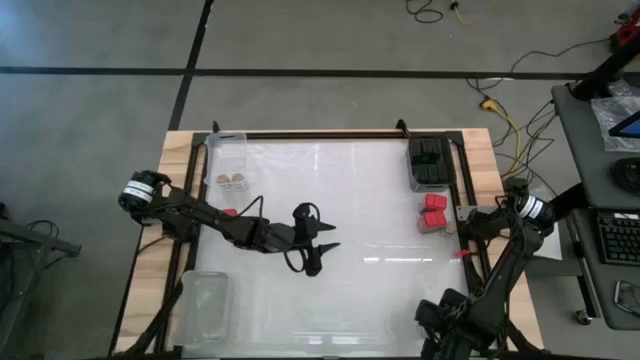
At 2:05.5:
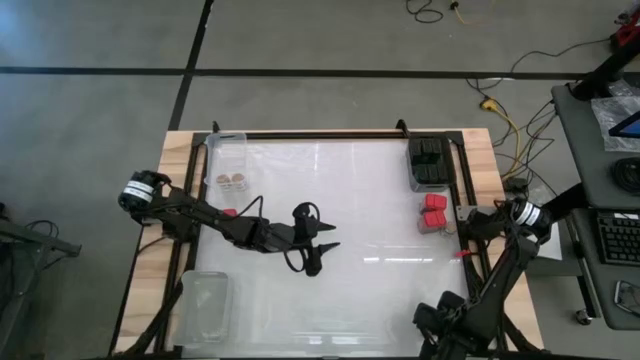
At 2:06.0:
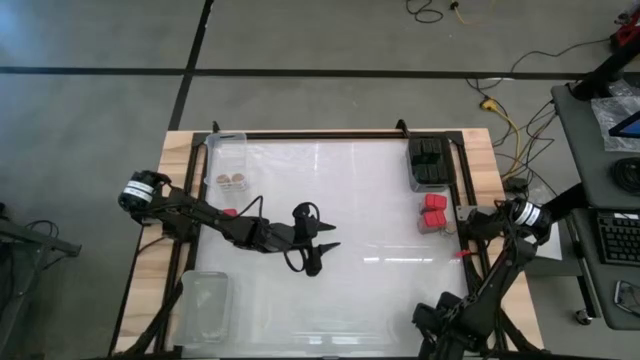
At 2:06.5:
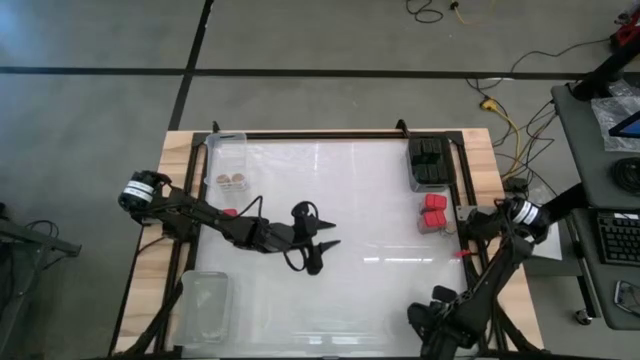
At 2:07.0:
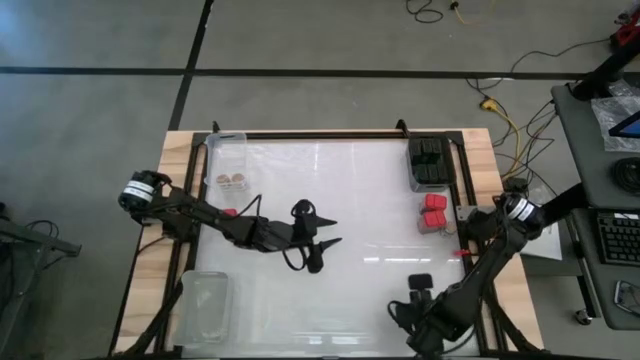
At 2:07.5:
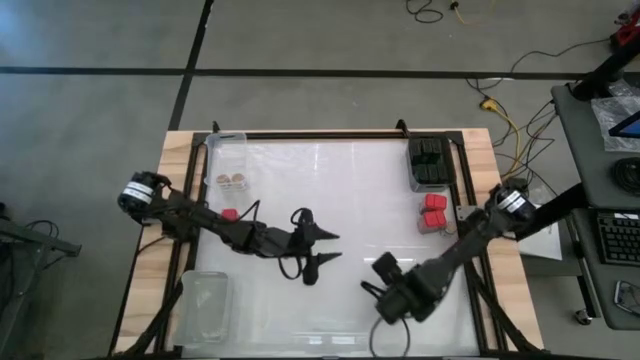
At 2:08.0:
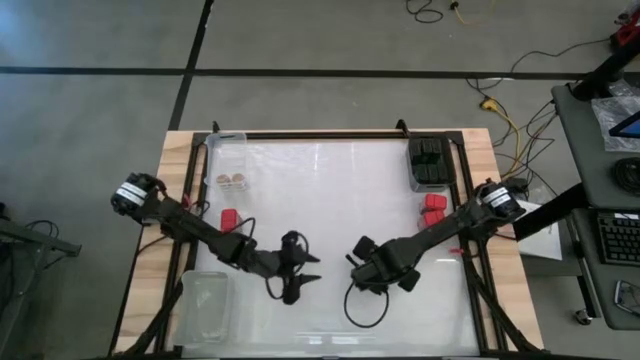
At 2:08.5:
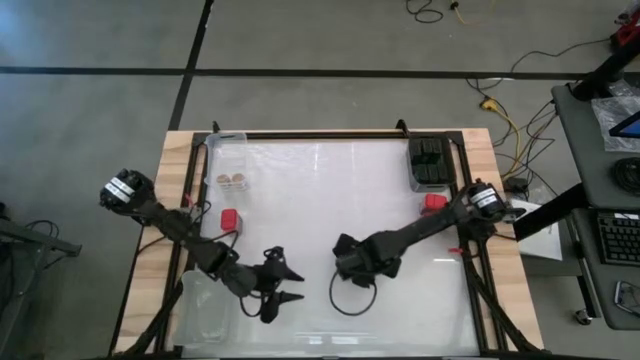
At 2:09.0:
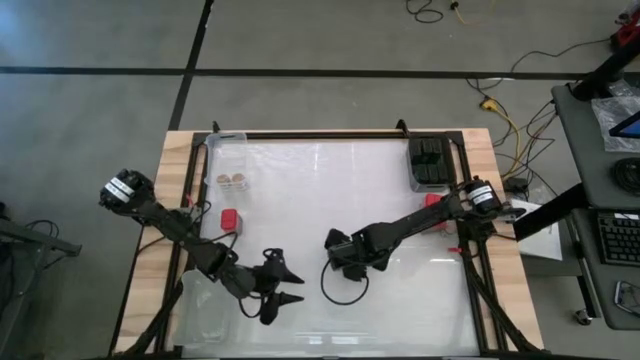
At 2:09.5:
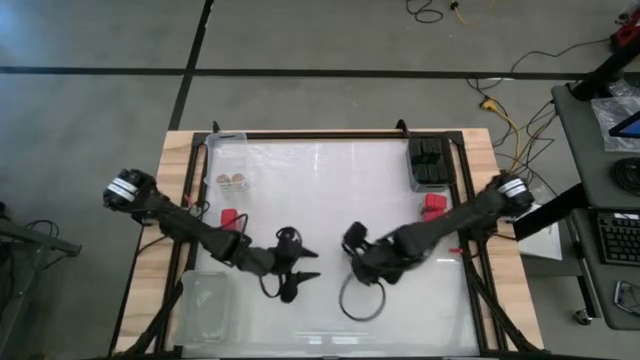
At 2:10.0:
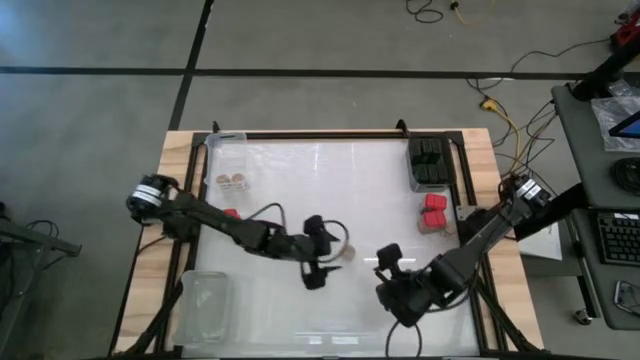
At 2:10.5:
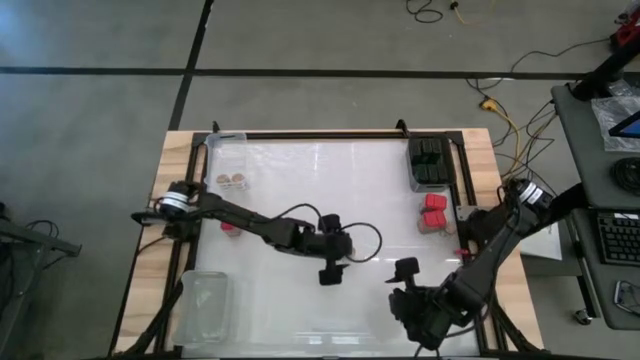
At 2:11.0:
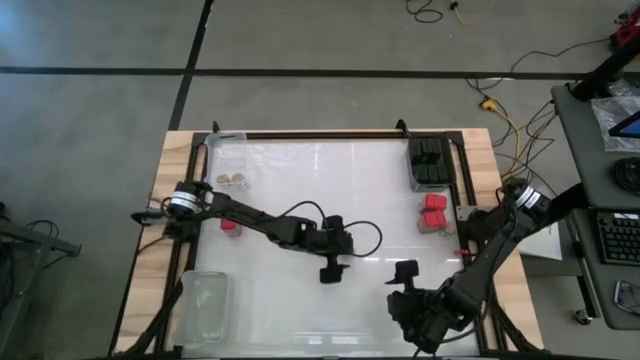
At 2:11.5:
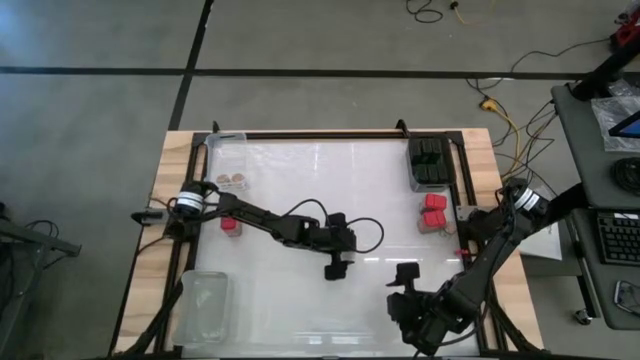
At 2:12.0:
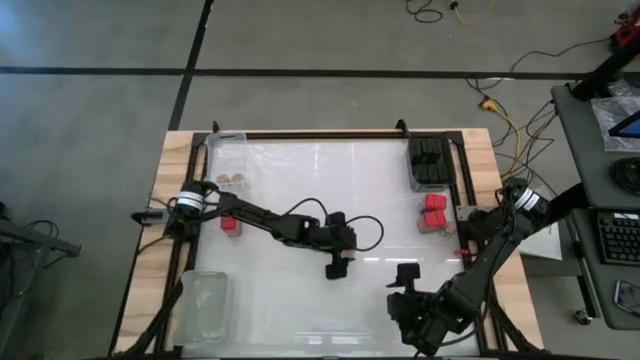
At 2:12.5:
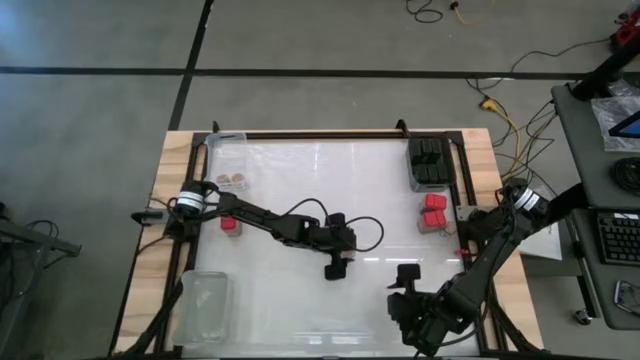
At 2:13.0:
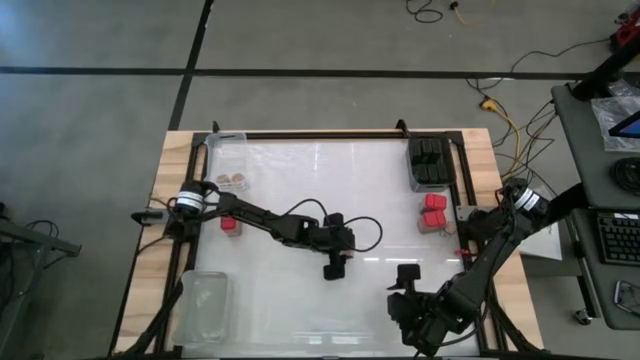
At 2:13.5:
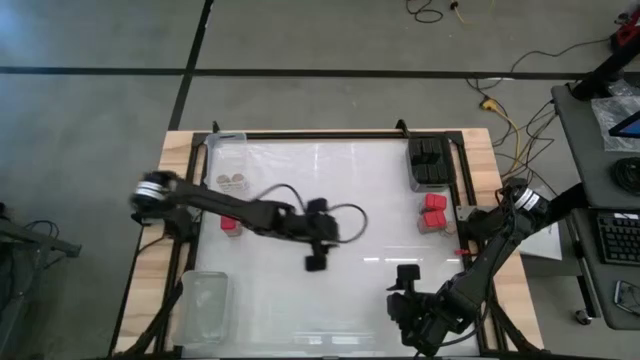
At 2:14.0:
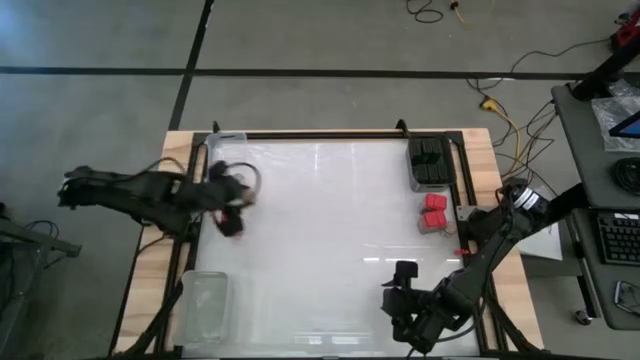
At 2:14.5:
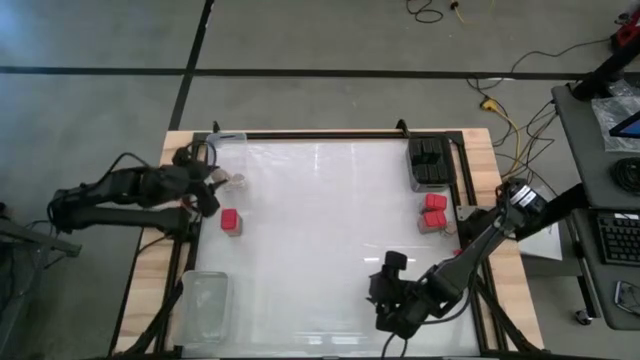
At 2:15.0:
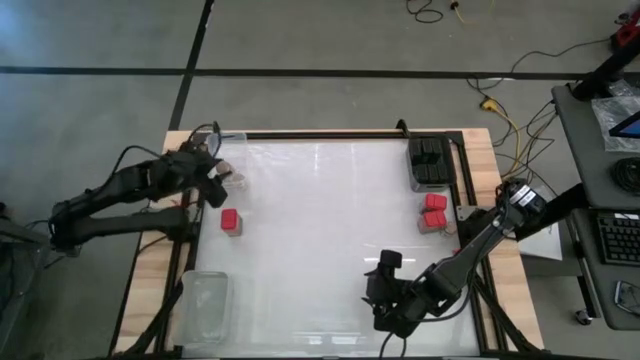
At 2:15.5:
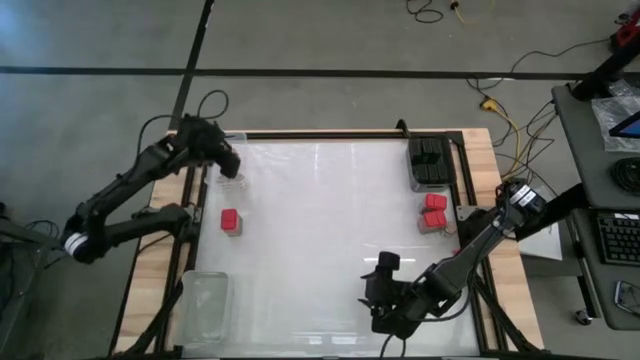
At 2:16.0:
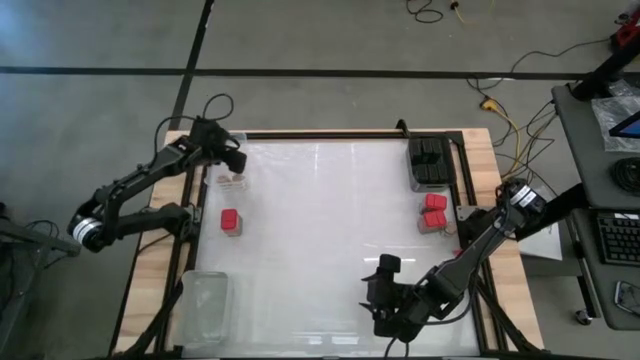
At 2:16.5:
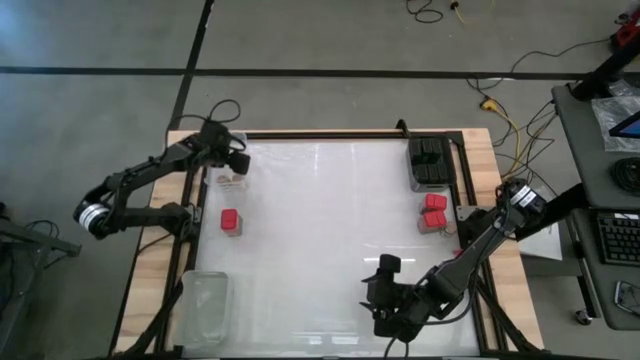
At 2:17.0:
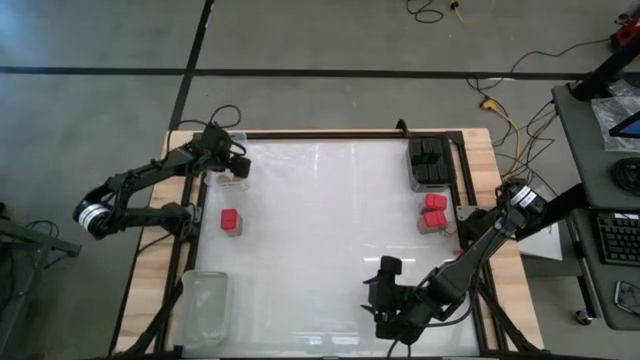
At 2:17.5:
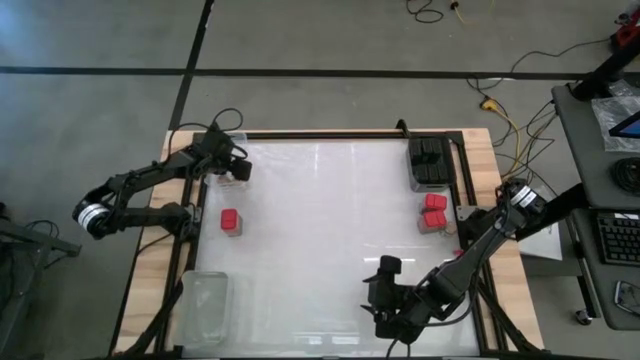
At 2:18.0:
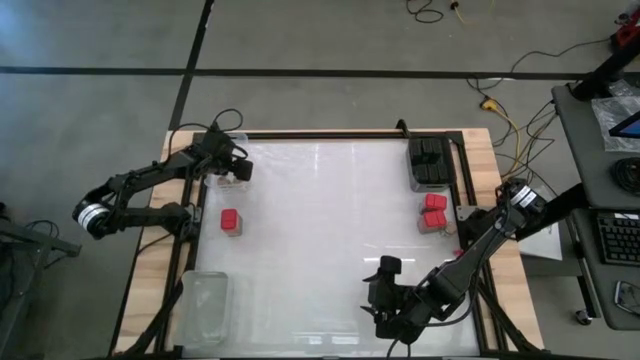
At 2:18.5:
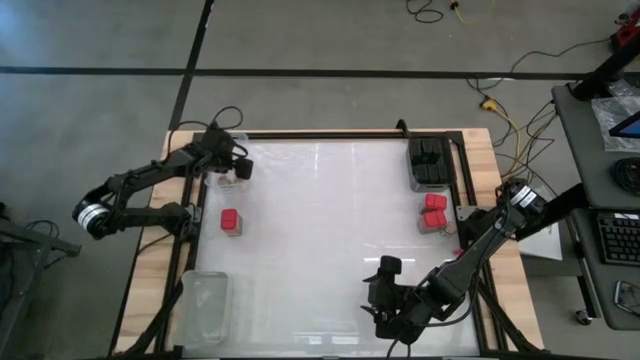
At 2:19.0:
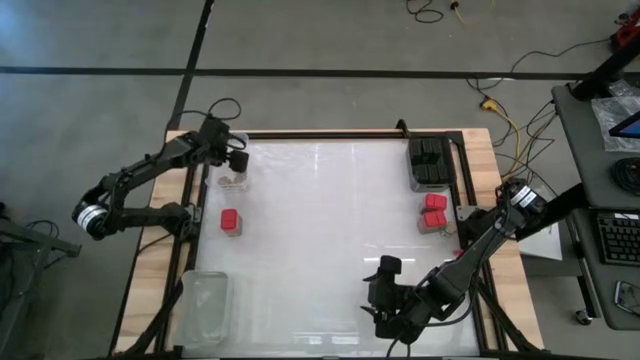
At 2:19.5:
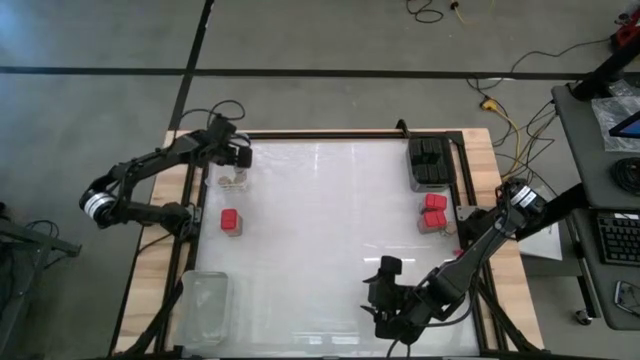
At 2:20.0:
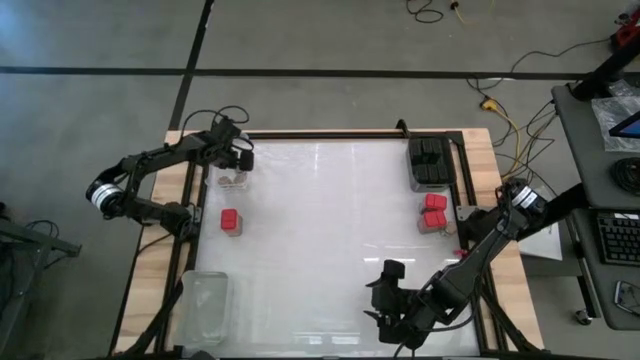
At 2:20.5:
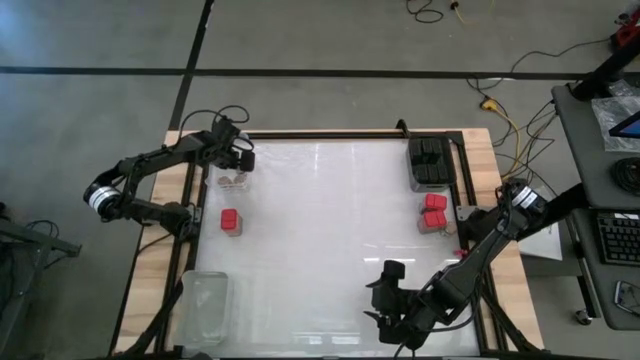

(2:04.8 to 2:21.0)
Task: Sort spices by type
Put the brown seasoning bottle into the transparent bin

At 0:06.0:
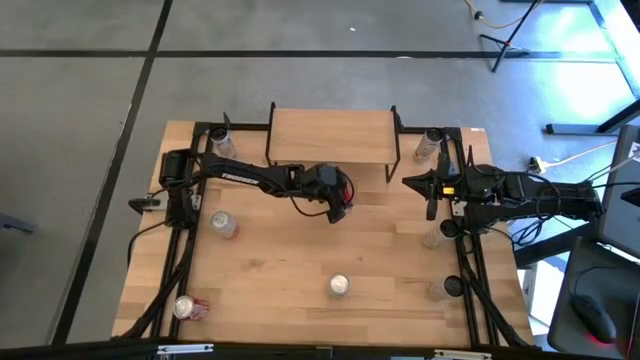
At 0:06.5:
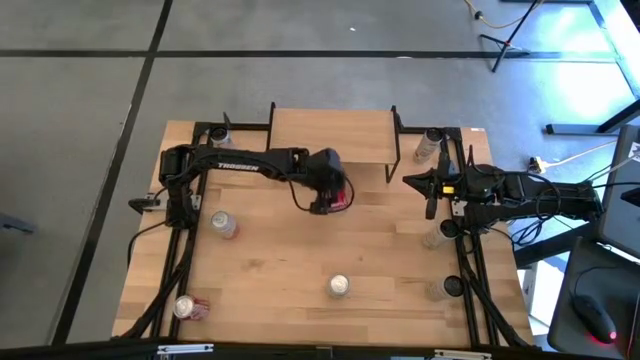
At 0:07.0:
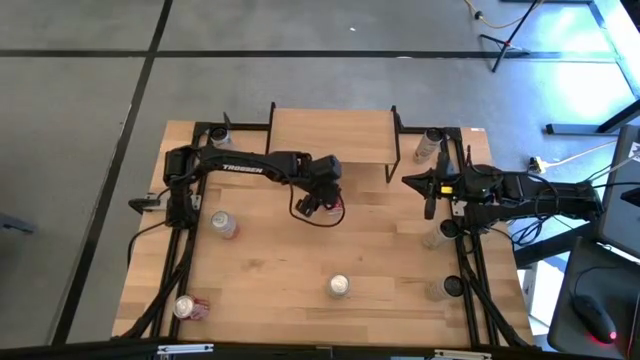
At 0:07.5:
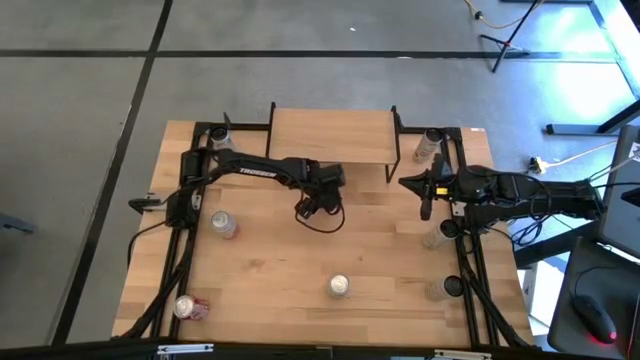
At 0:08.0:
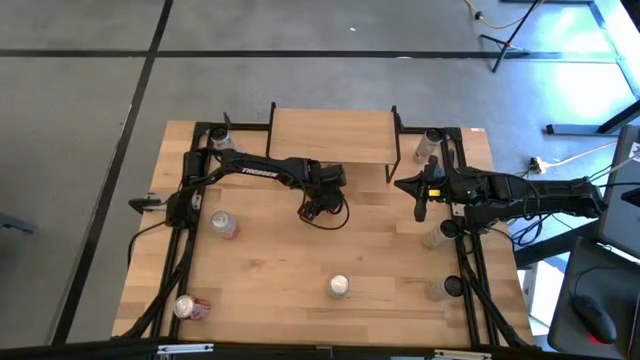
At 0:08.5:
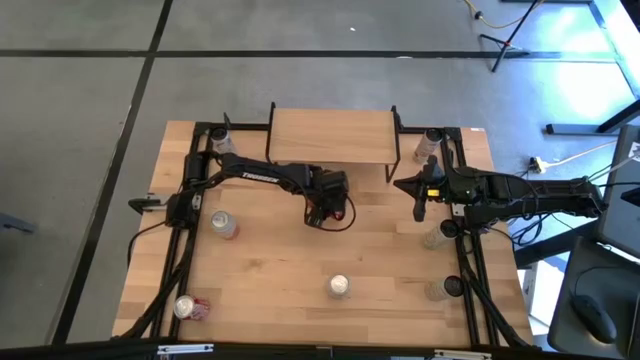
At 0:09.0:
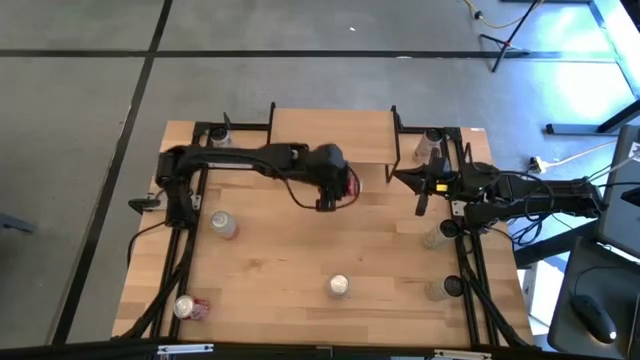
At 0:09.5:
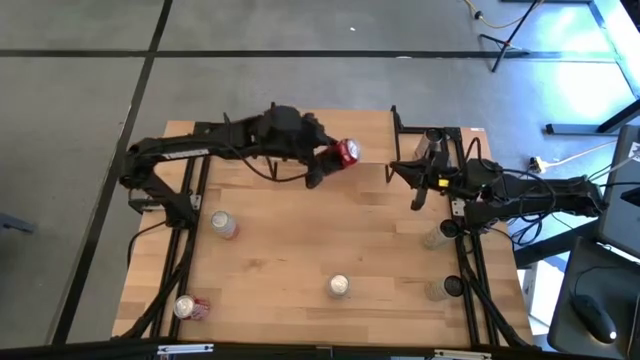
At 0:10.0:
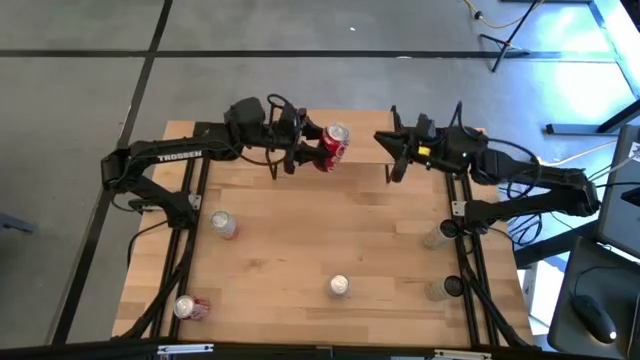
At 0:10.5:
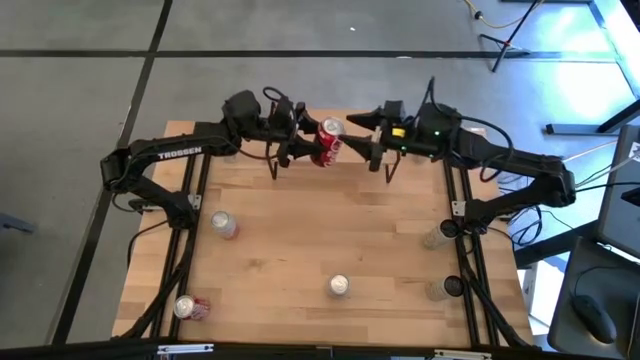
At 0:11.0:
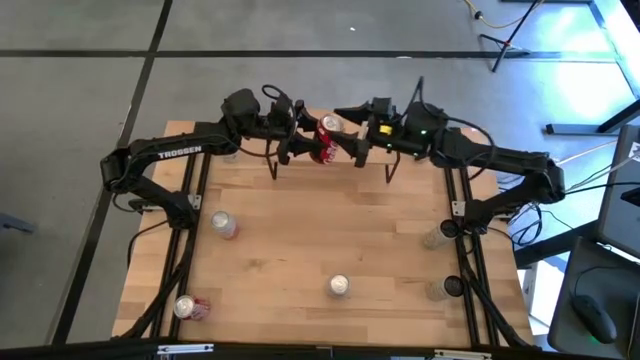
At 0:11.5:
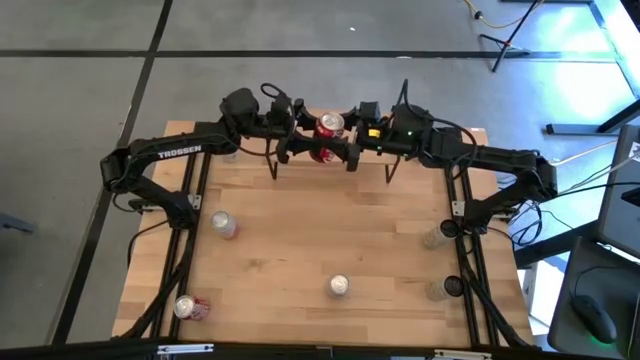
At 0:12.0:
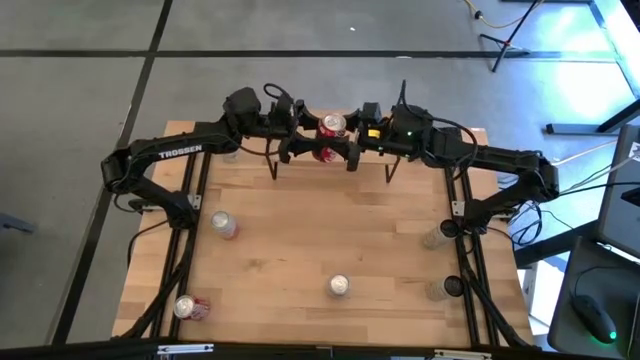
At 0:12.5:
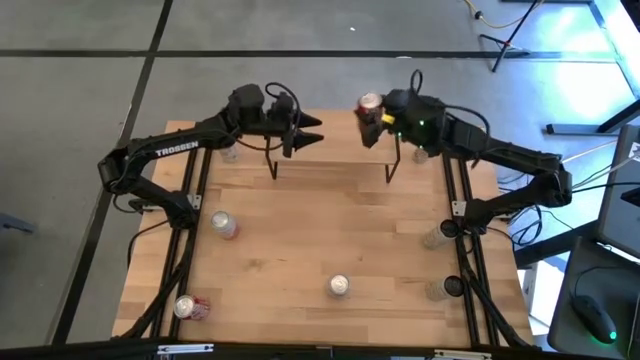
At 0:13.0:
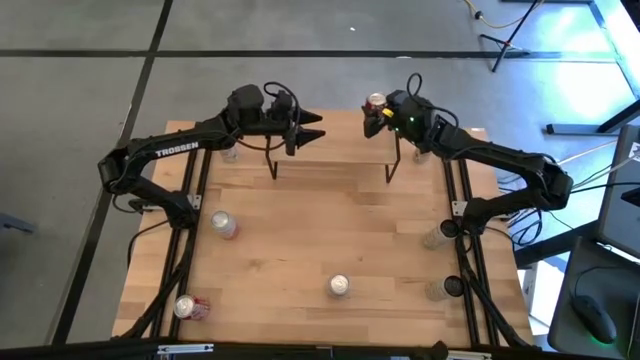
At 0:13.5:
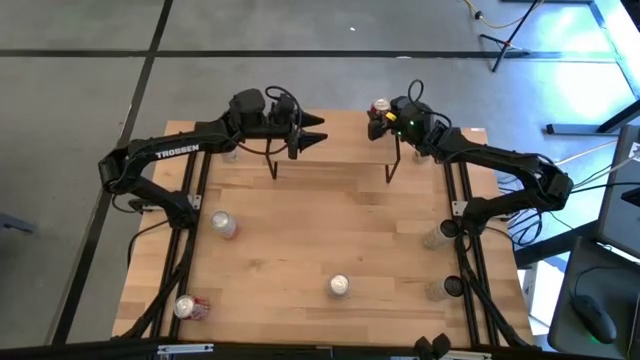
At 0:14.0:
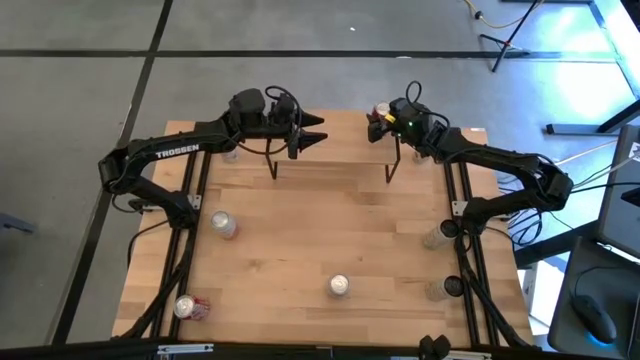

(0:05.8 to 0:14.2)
Task: Place canned beverage on shelf
Put the top red soda can on the shelf
